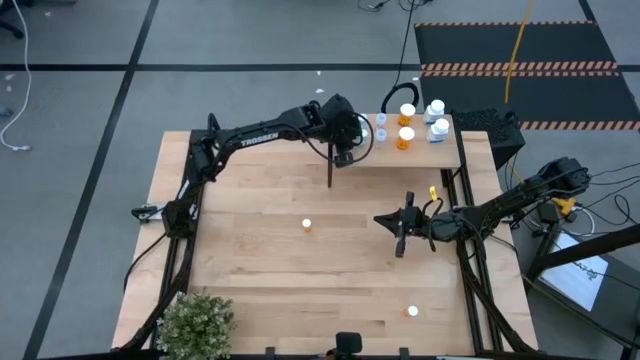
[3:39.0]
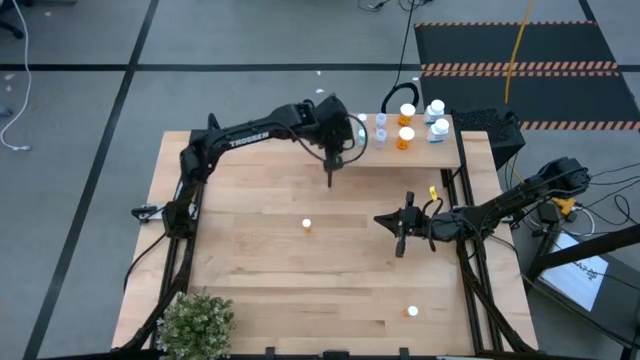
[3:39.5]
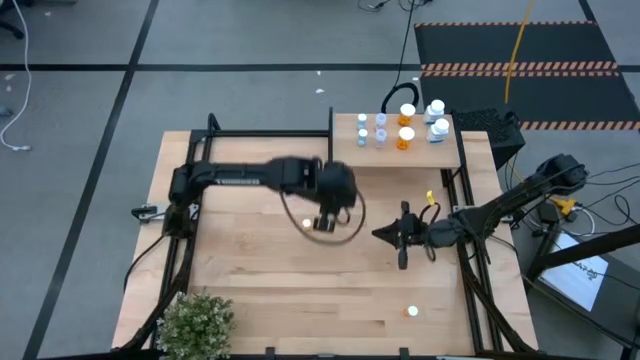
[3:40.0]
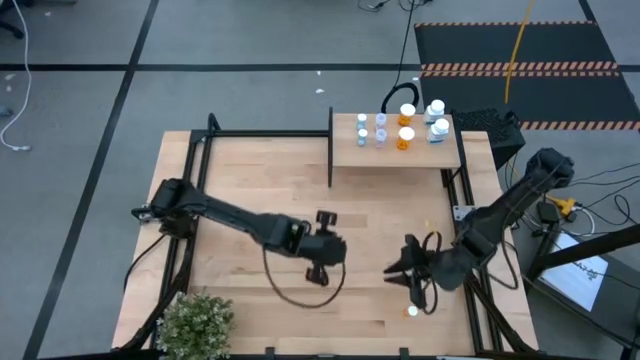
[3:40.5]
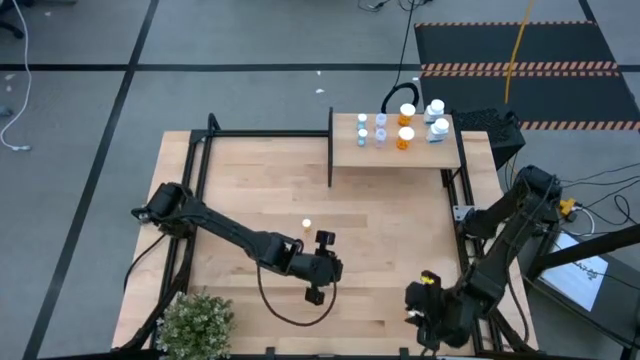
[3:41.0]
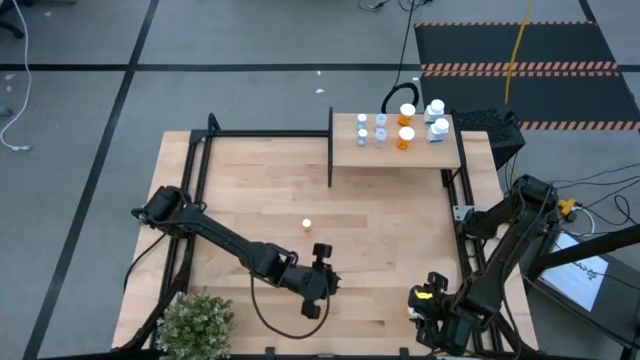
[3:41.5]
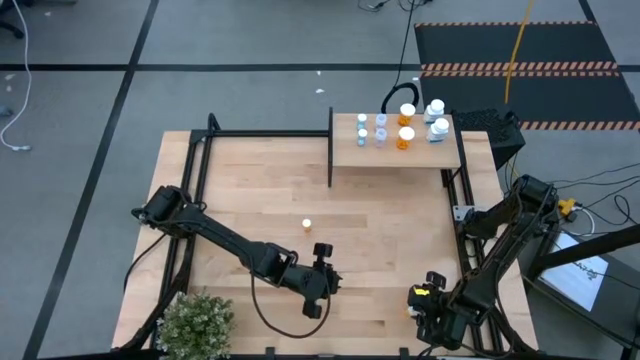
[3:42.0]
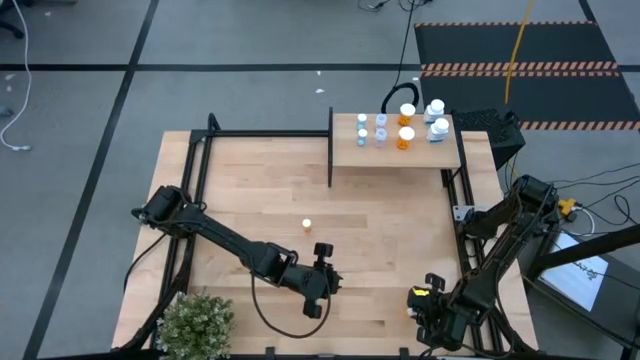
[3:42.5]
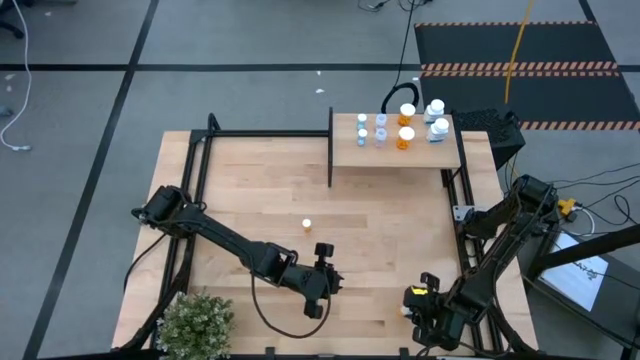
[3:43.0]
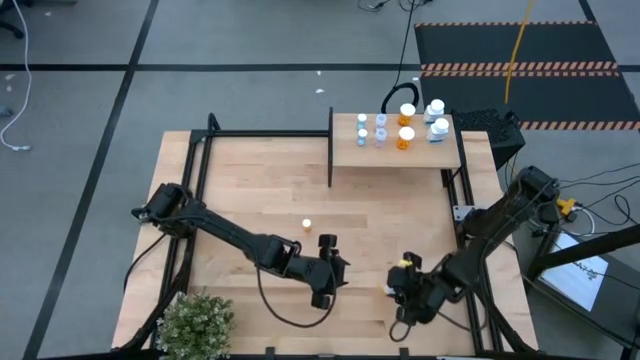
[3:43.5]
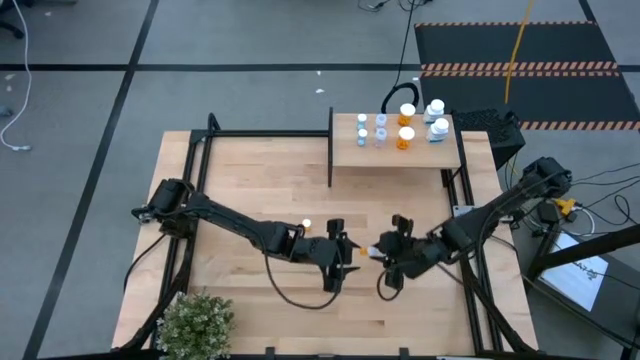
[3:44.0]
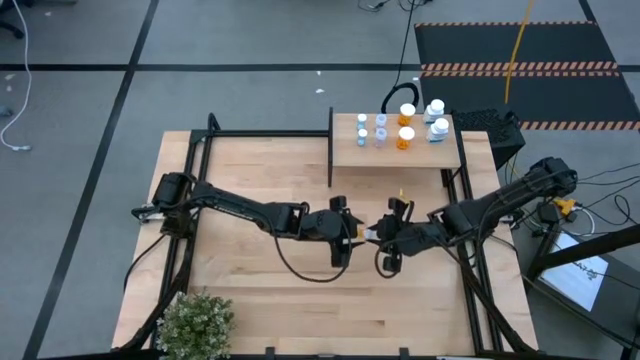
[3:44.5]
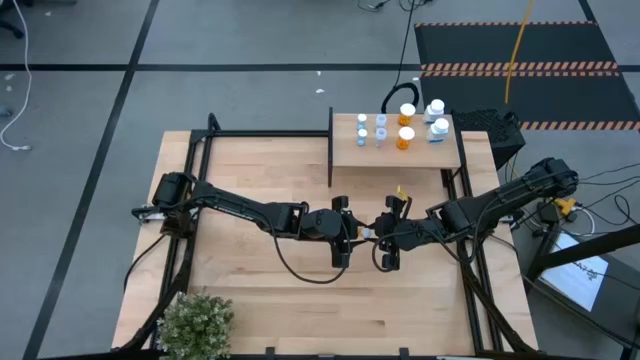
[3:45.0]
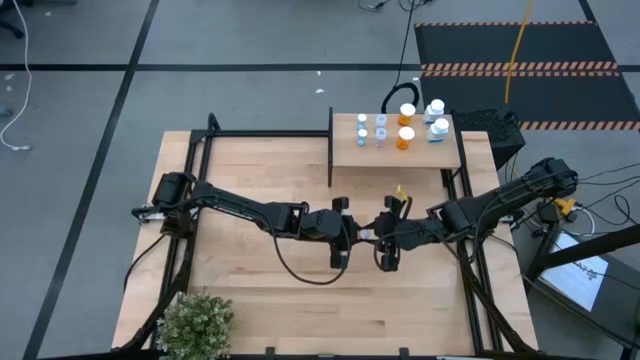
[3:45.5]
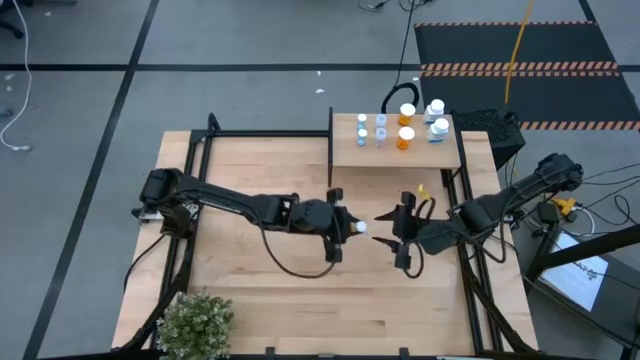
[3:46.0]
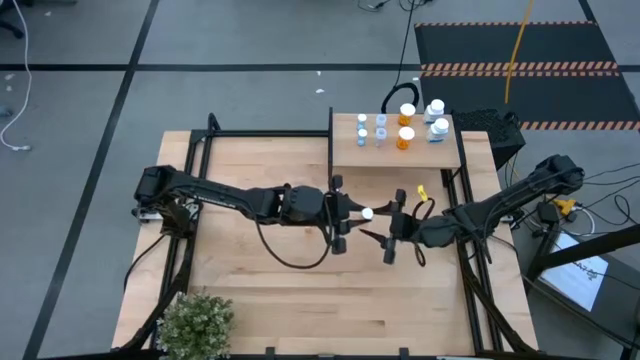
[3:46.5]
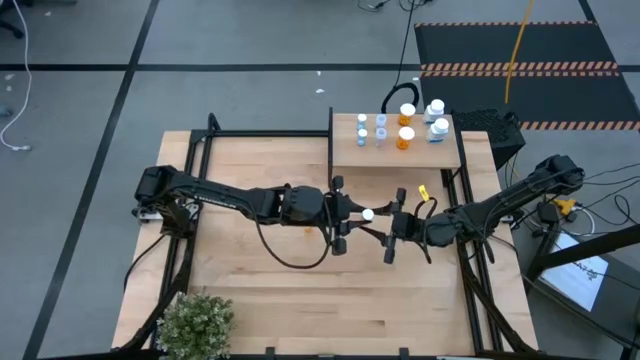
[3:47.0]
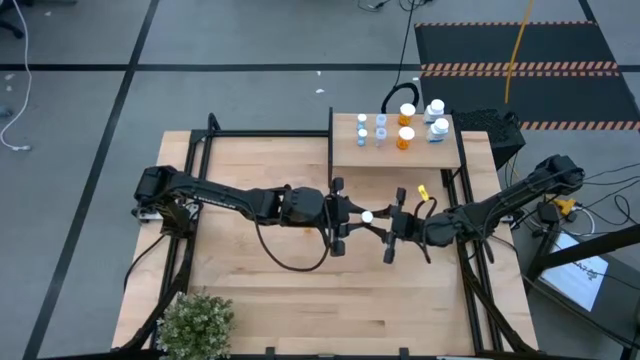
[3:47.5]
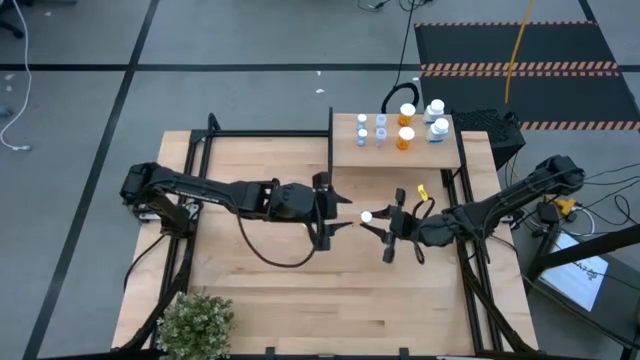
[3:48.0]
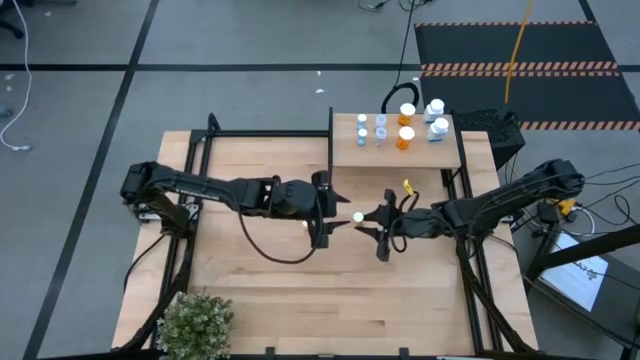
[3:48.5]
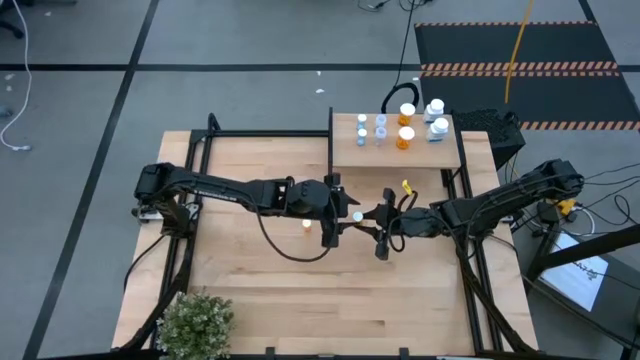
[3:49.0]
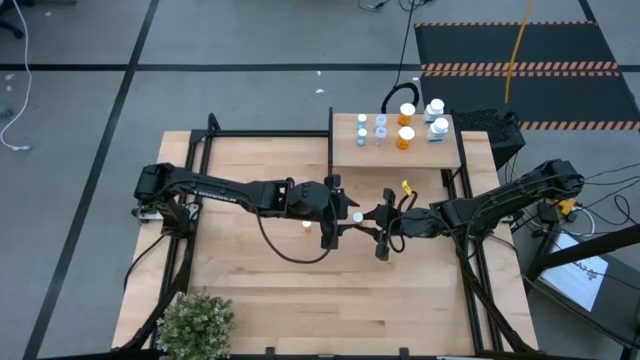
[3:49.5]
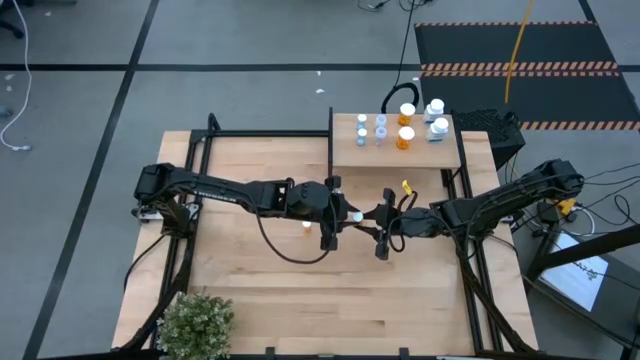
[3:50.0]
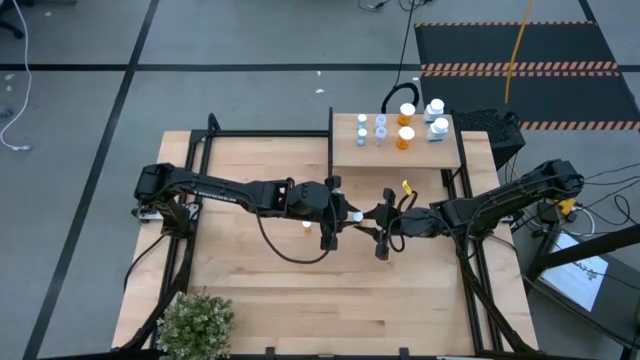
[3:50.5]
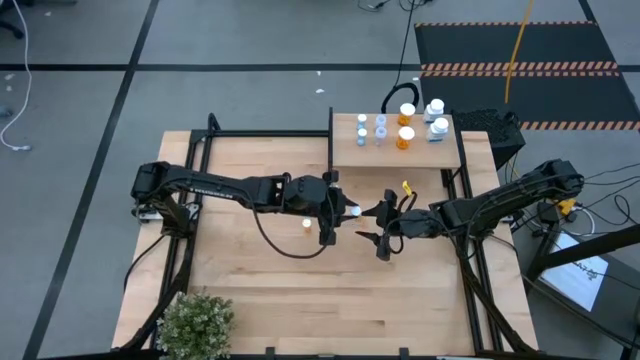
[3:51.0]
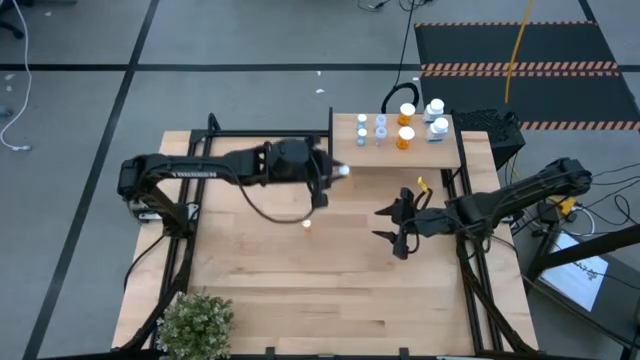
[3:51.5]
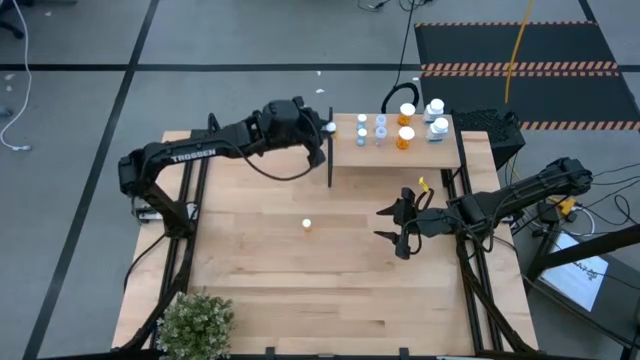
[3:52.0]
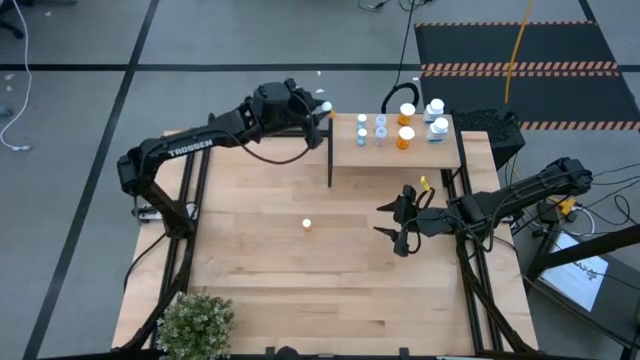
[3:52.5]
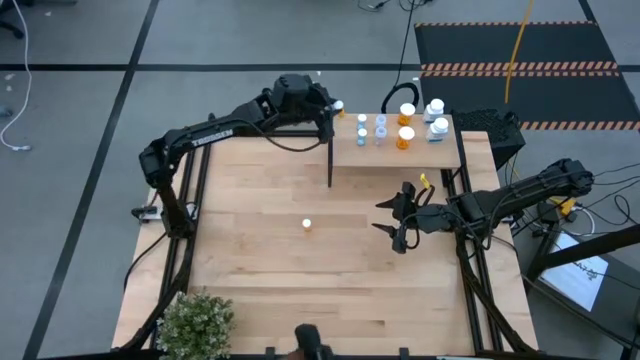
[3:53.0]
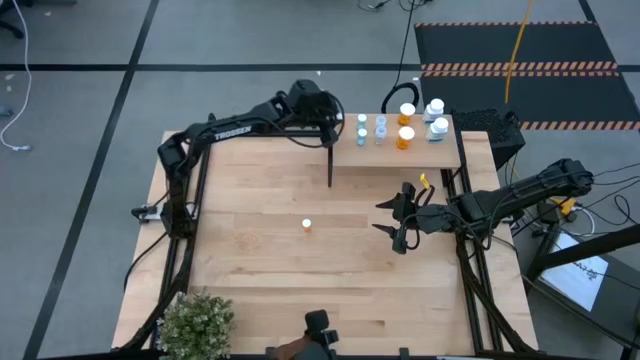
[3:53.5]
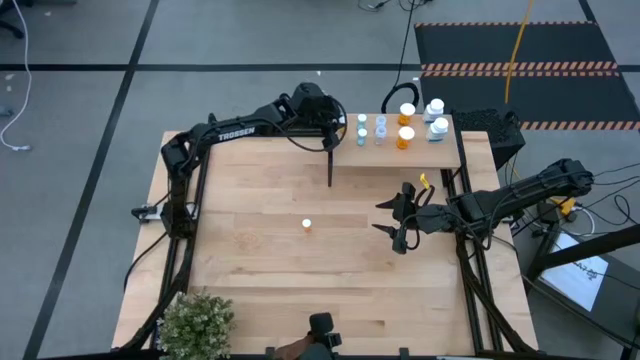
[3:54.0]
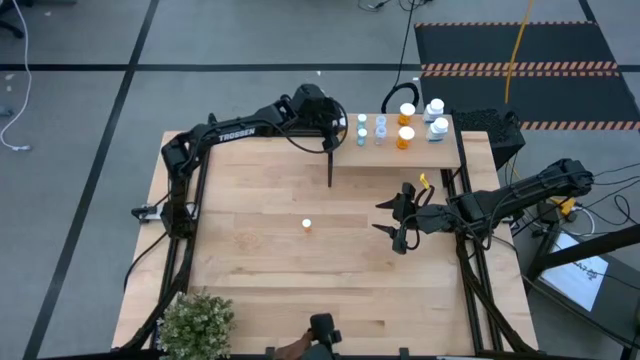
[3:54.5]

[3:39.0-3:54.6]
Task: Pick and place medicine bottles onto shelf by color
Put the bottom small orange pill bottle on the shelf

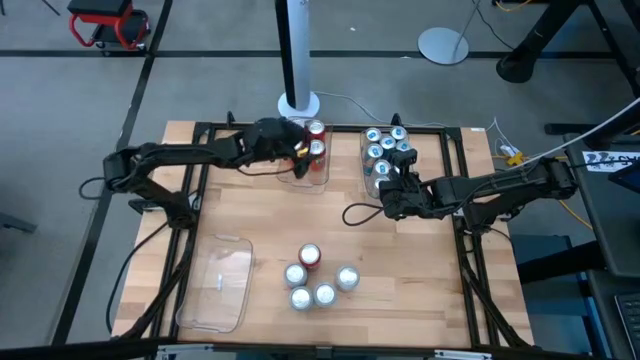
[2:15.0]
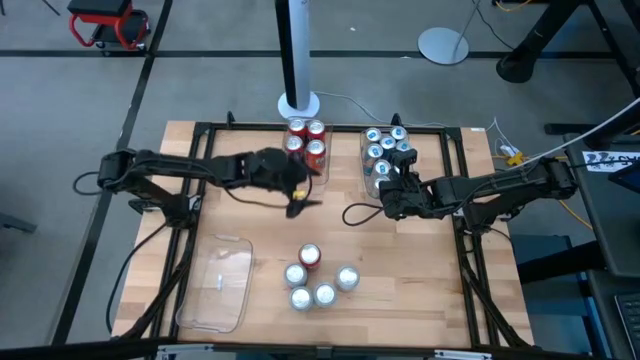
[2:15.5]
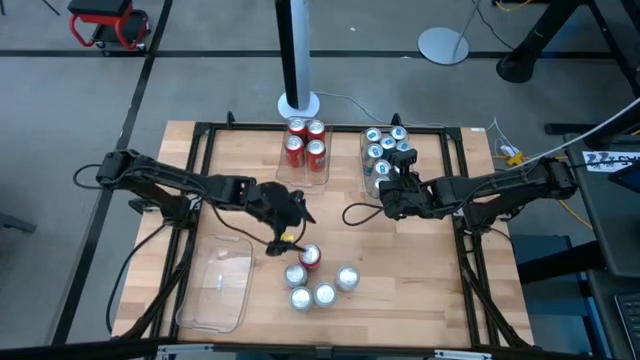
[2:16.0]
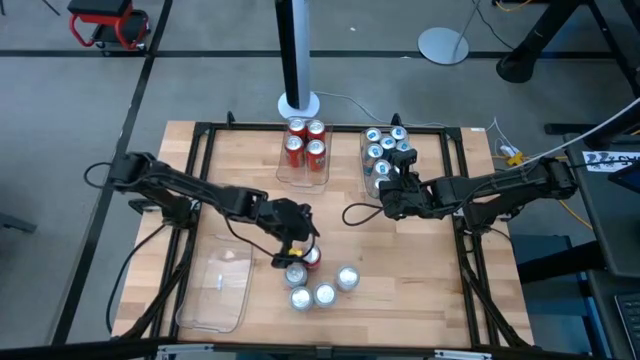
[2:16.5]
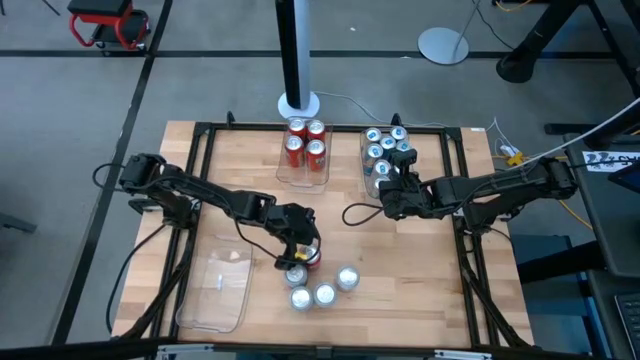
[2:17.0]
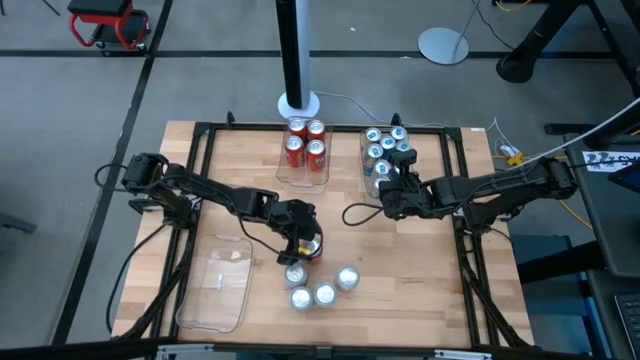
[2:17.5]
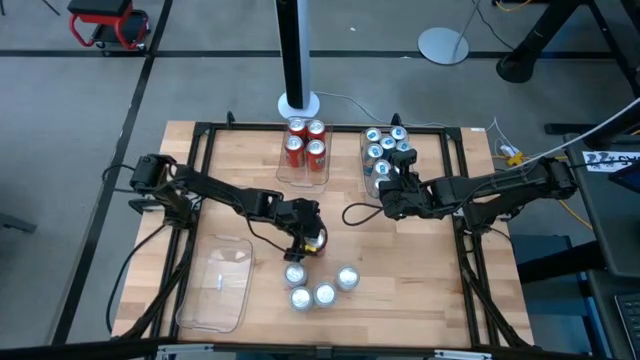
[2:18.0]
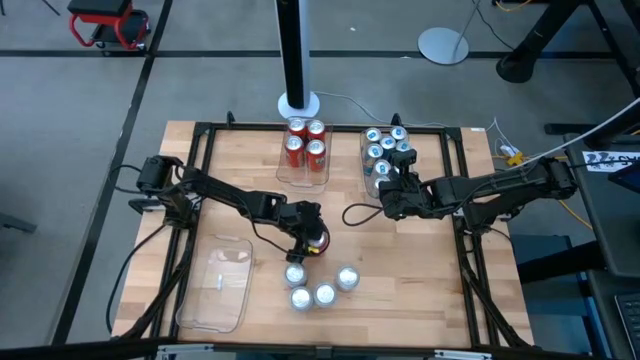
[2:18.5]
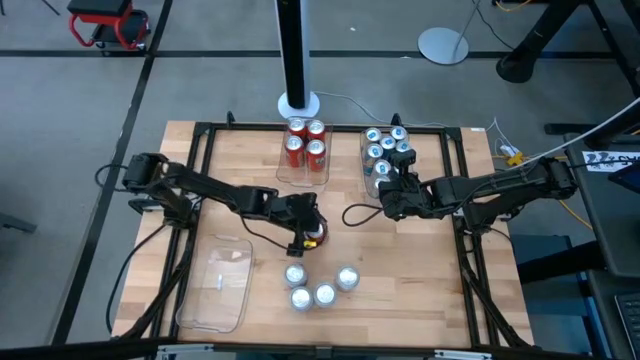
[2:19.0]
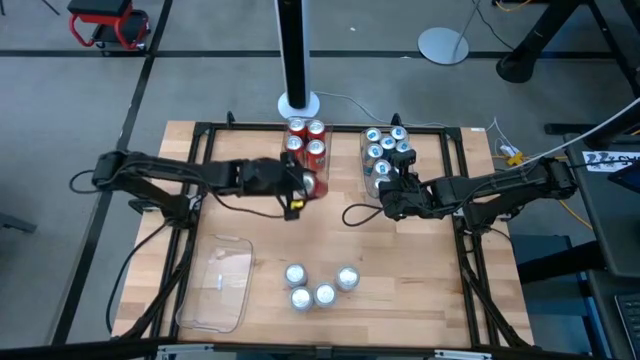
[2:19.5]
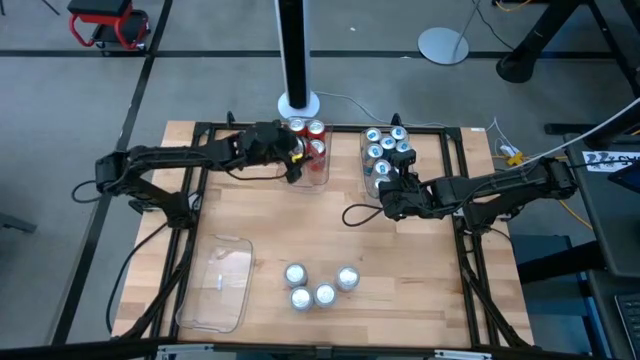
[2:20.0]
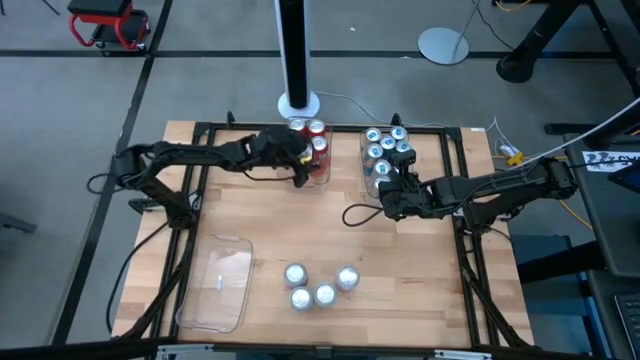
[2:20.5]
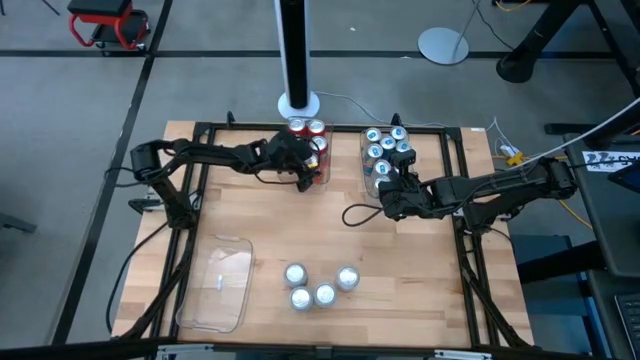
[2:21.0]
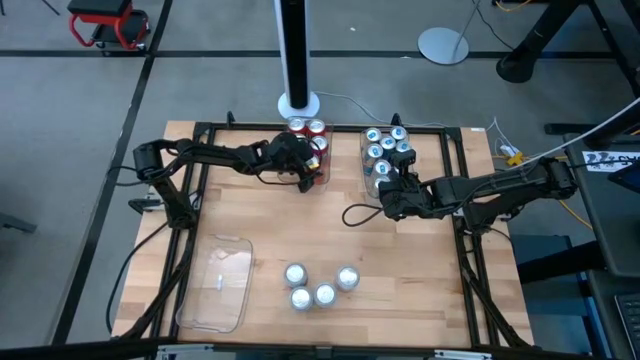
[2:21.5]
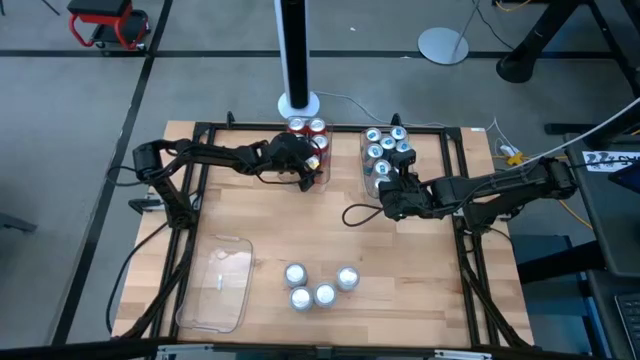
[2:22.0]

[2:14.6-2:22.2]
Task: Sort soda cans
Put the red soda can into the top center transparent bin
